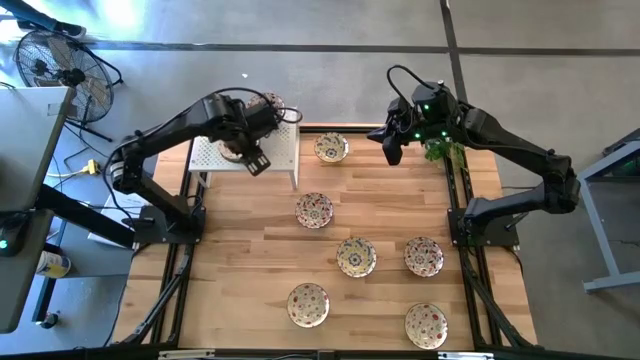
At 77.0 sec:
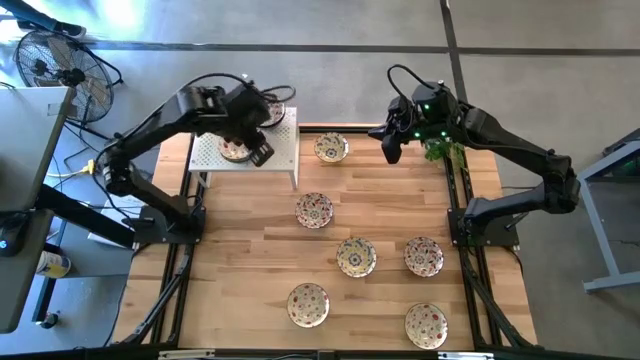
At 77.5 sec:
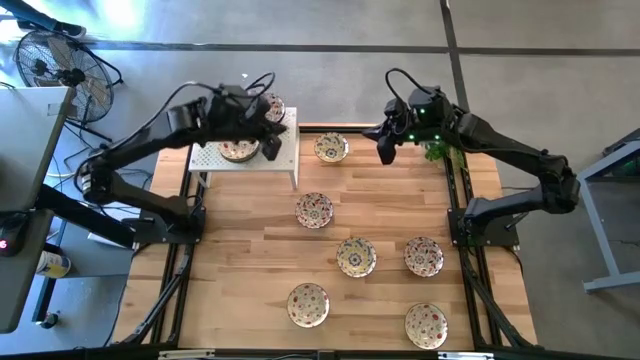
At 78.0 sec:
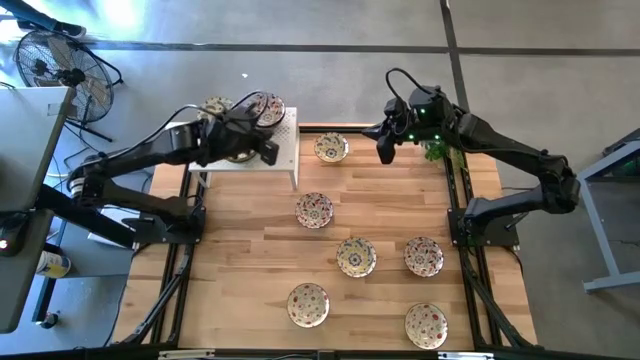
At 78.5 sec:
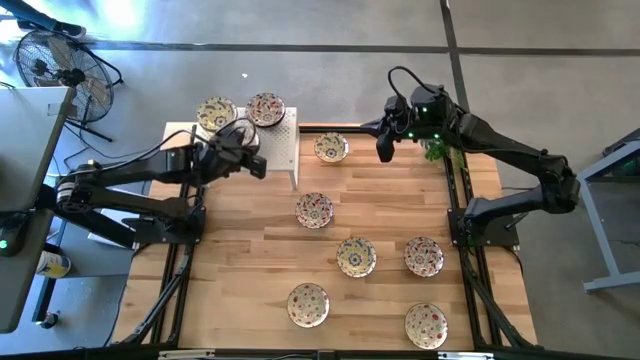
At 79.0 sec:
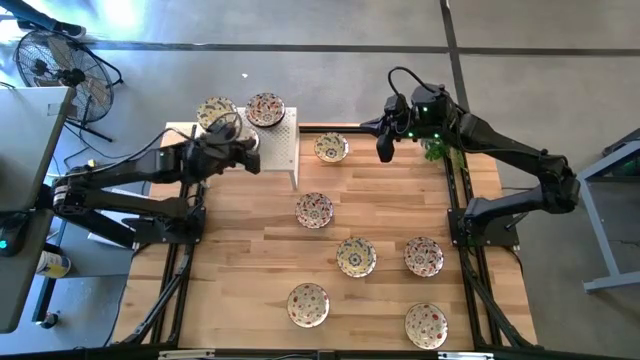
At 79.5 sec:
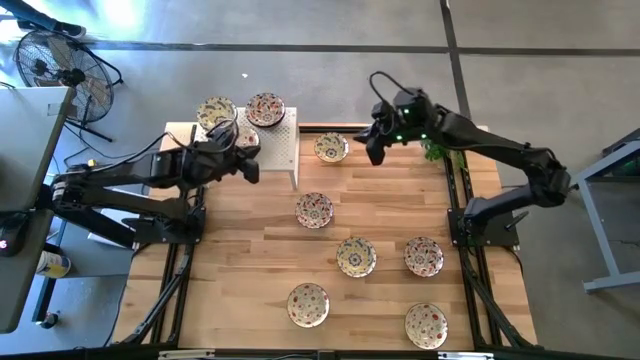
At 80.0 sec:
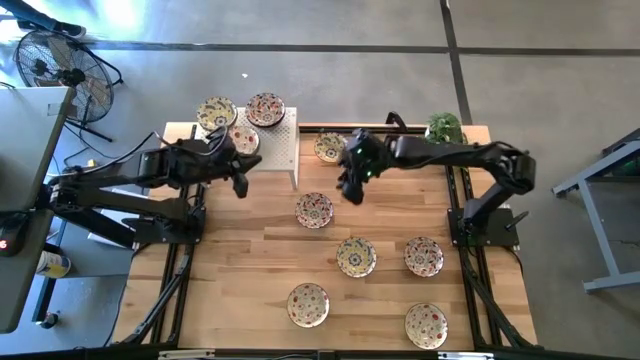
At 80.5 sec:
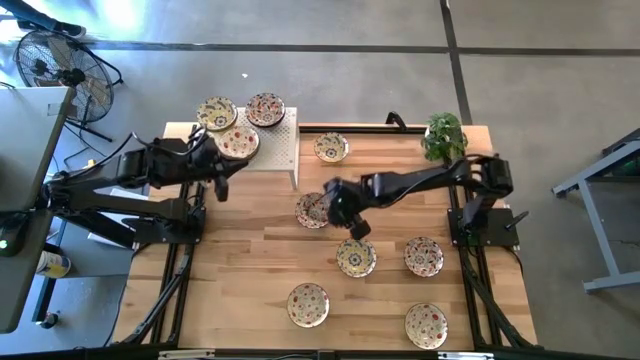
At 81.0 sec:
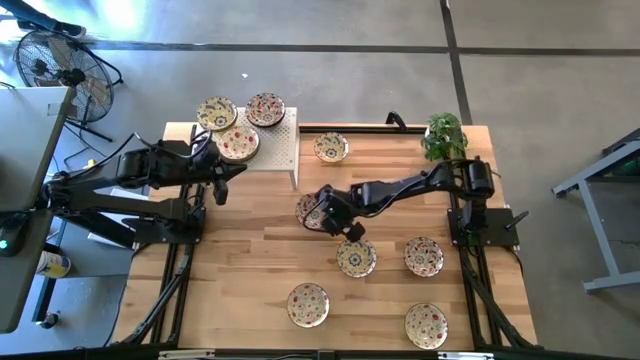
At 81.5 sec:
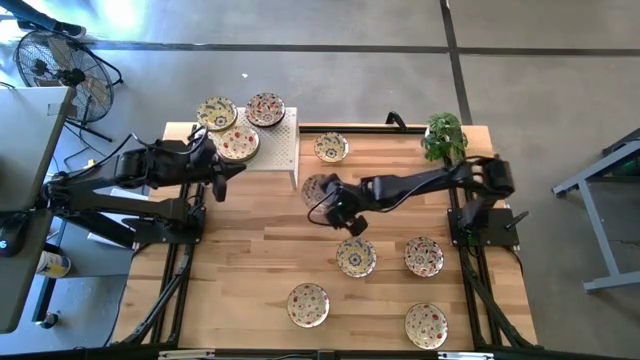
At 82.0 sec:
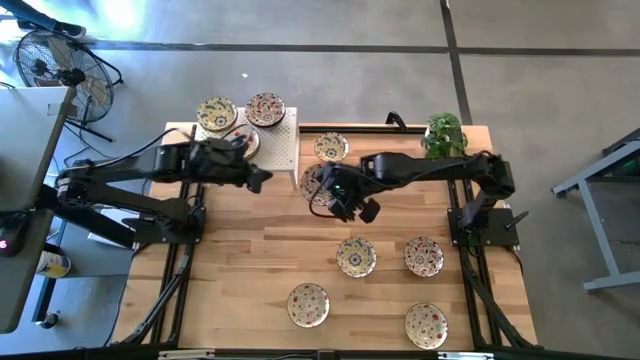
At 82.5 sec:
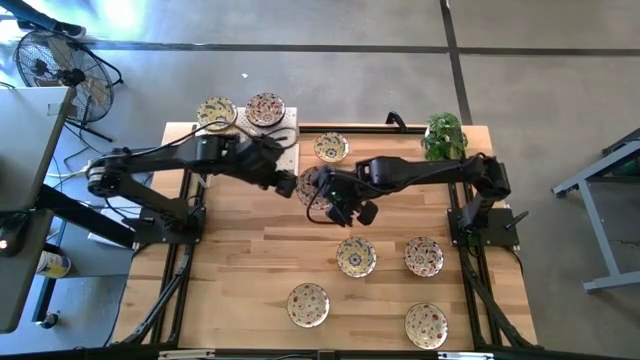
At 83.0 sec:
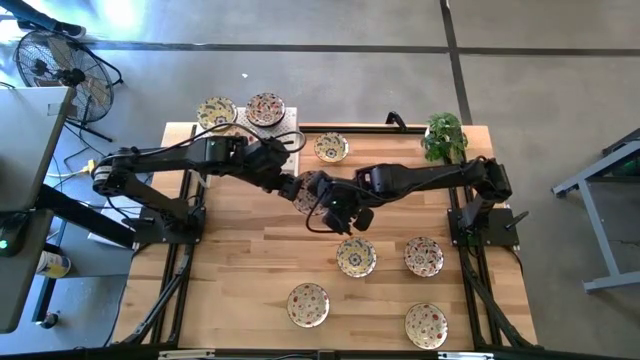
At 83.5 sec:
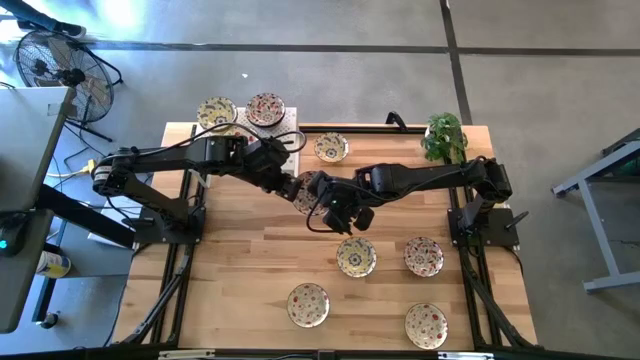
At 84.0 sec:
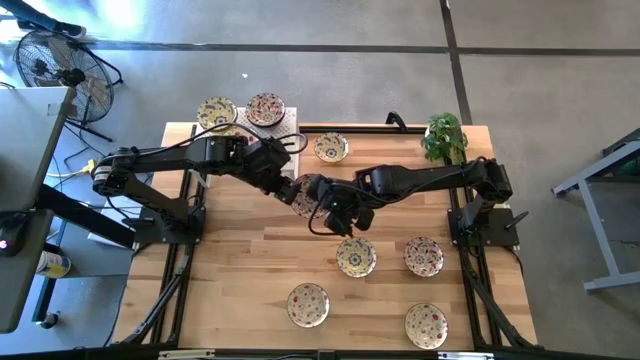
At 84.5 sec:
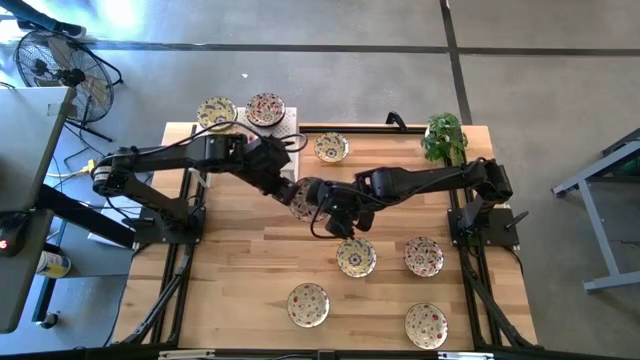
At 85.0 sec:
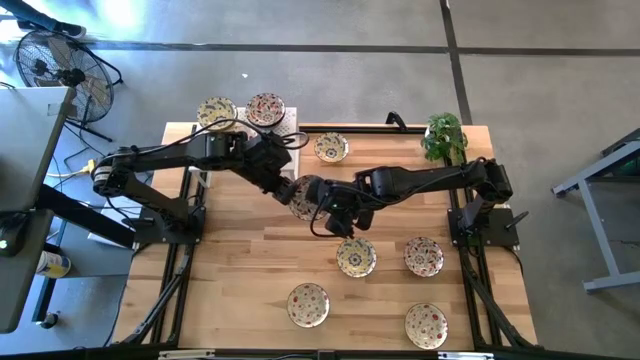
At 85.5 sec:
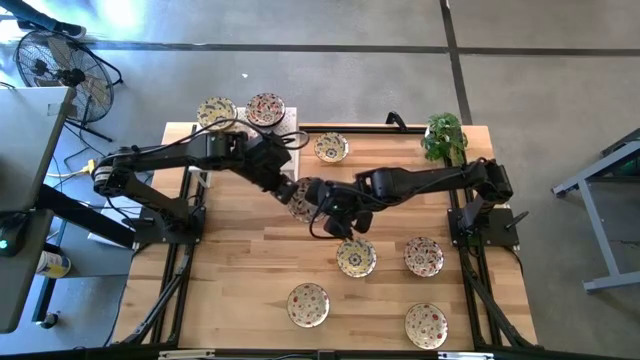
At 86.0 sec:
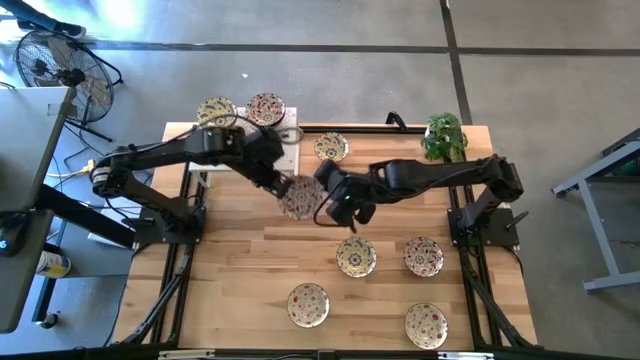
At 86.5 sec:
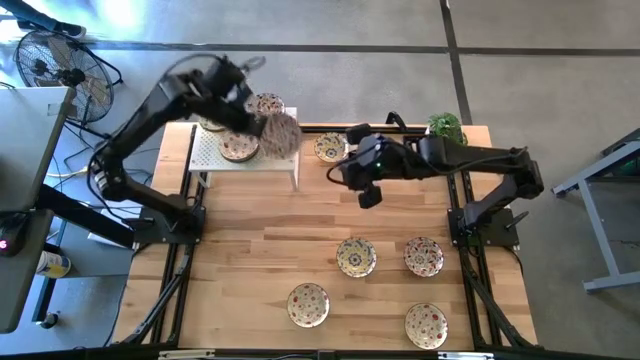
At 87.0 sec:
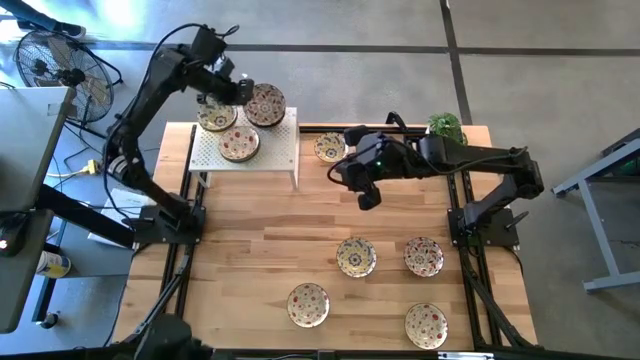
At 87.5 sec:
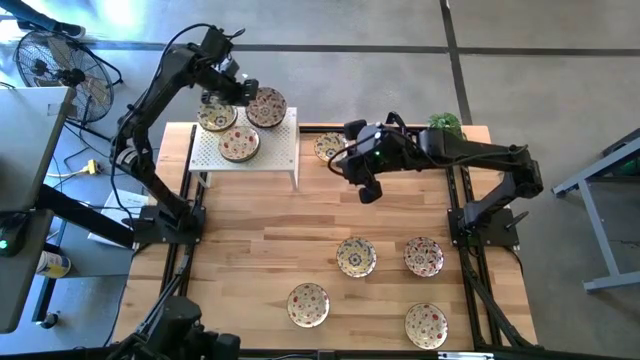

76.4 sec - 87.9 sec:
Task: Pick & Place Mini bowls
Stack the green patterned bowl on top of the green patterned bowl on the shelf

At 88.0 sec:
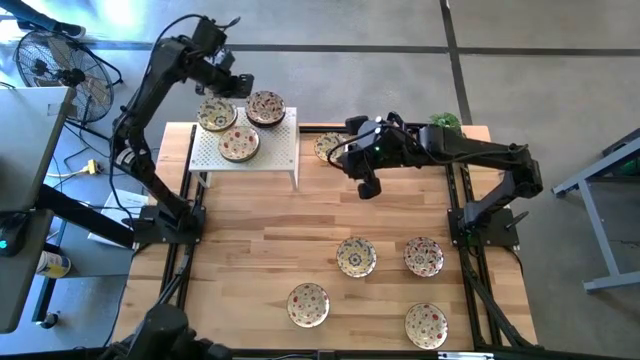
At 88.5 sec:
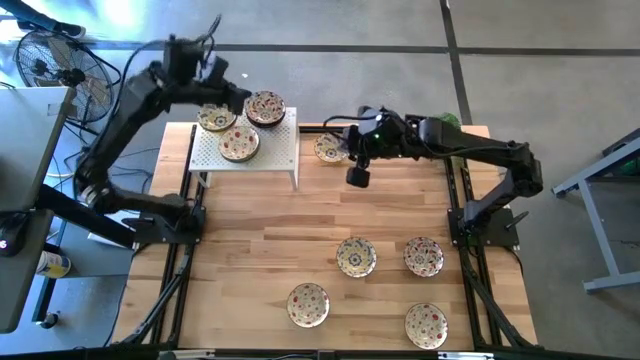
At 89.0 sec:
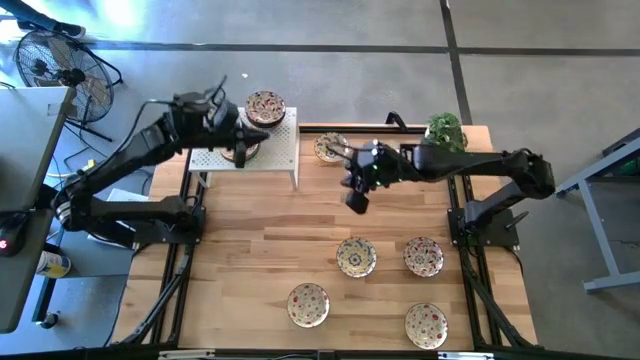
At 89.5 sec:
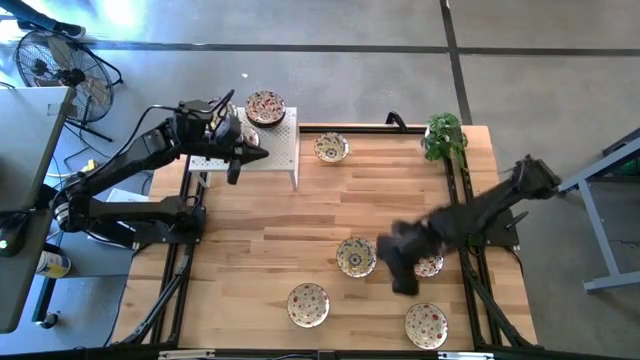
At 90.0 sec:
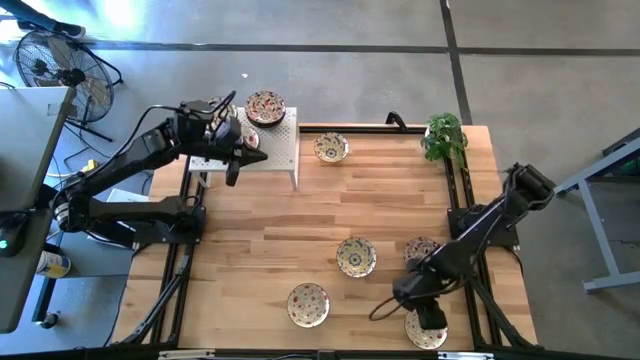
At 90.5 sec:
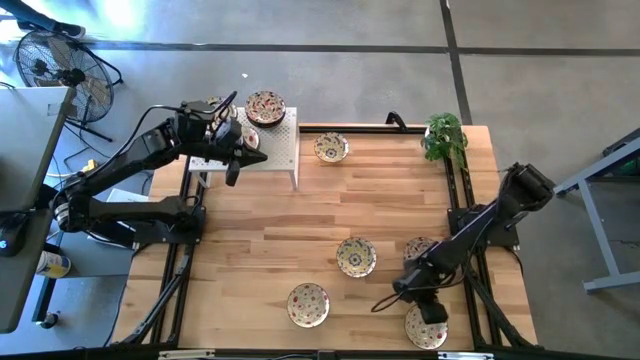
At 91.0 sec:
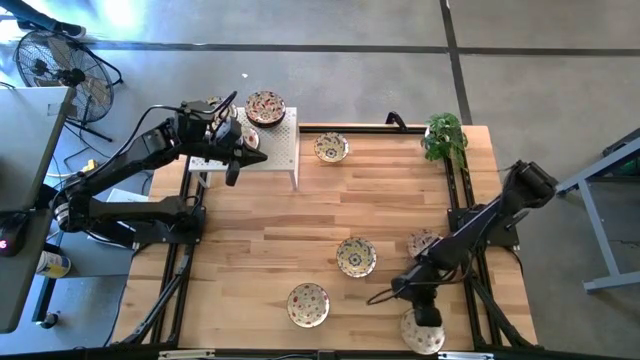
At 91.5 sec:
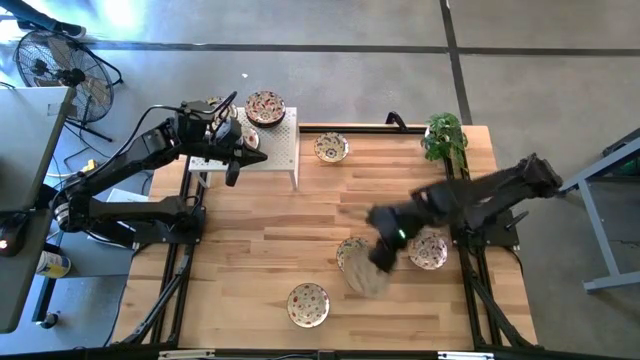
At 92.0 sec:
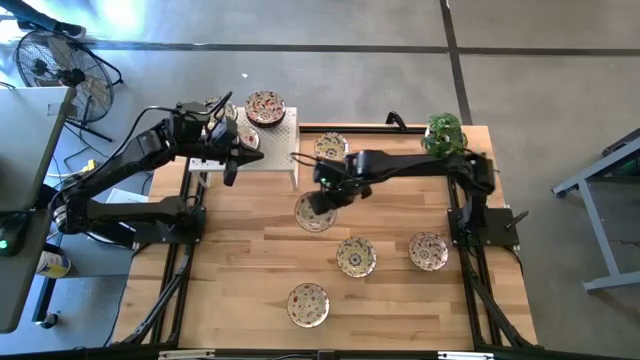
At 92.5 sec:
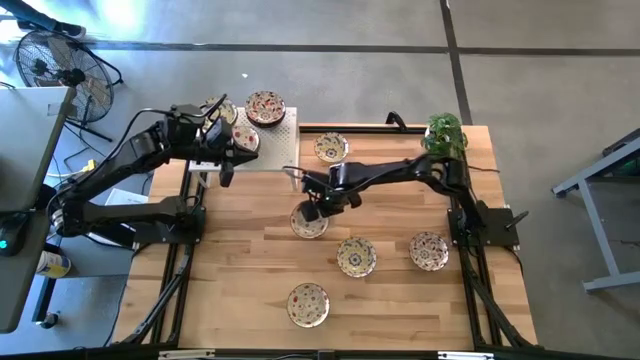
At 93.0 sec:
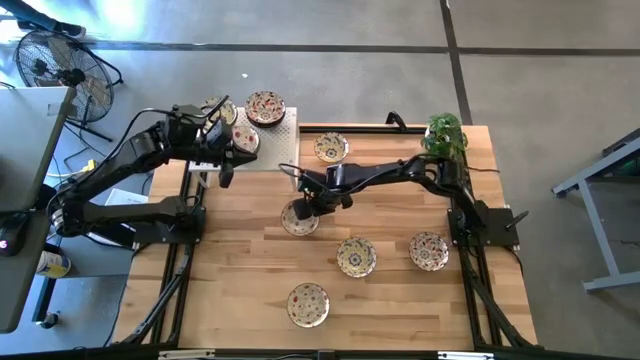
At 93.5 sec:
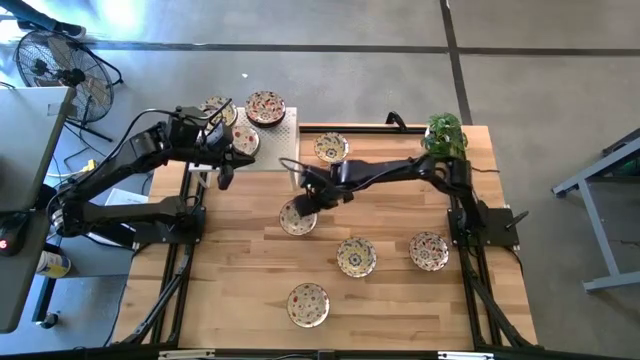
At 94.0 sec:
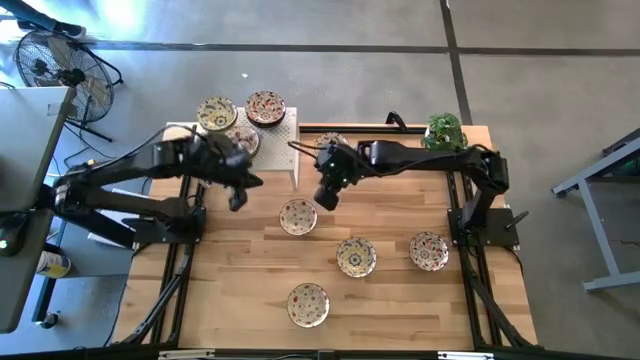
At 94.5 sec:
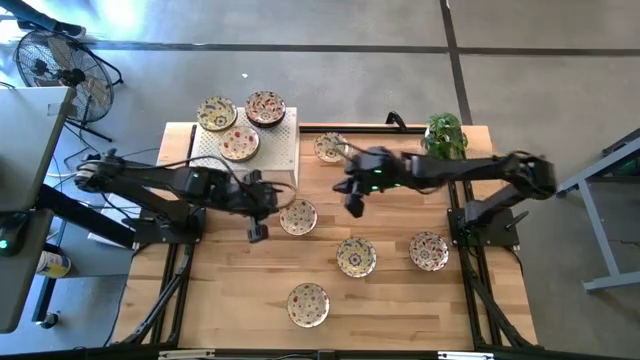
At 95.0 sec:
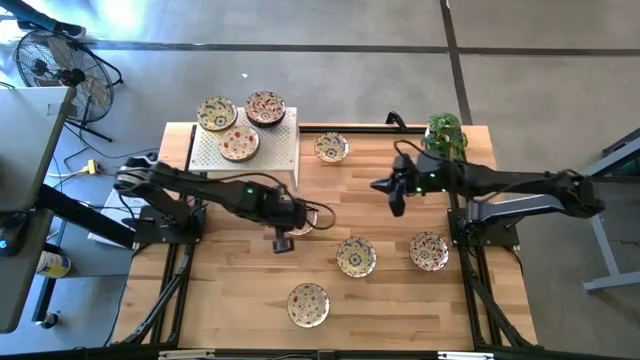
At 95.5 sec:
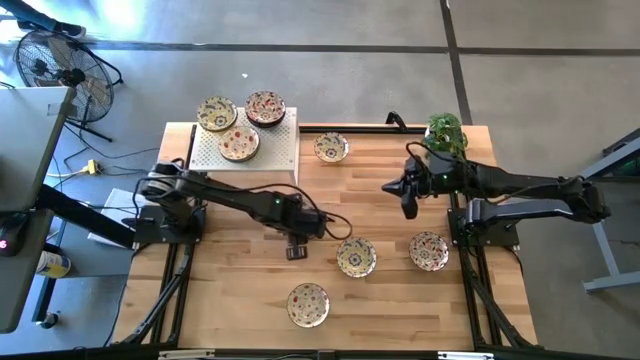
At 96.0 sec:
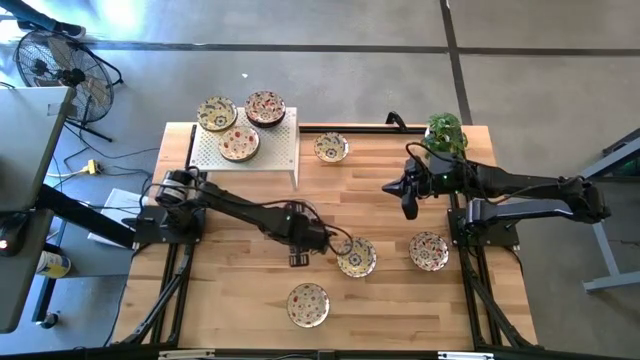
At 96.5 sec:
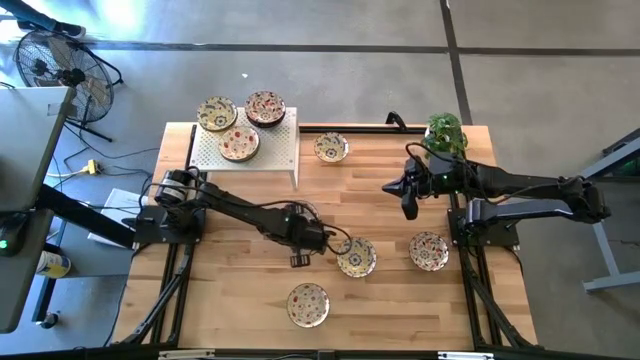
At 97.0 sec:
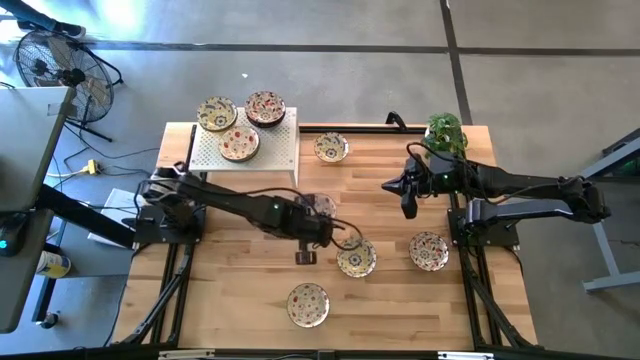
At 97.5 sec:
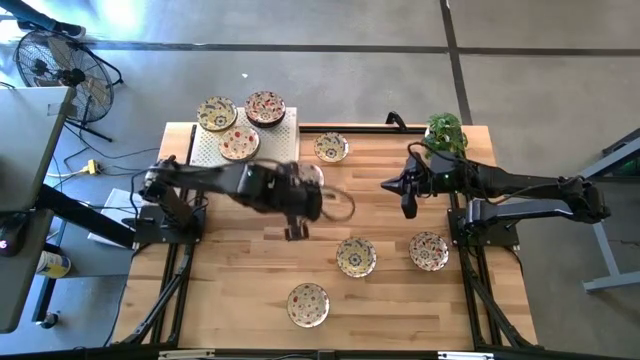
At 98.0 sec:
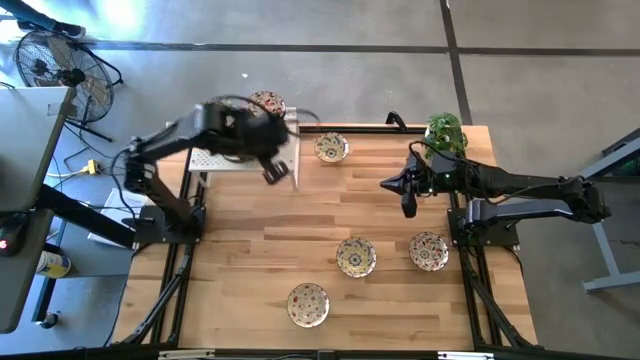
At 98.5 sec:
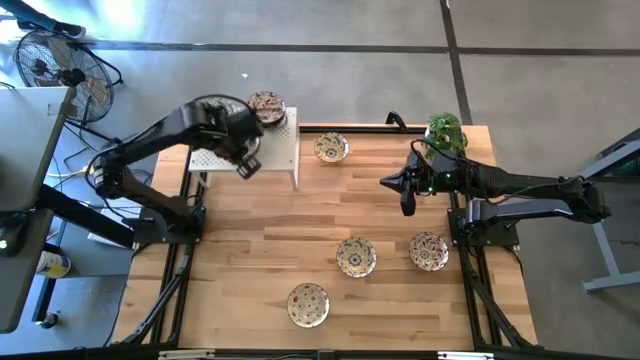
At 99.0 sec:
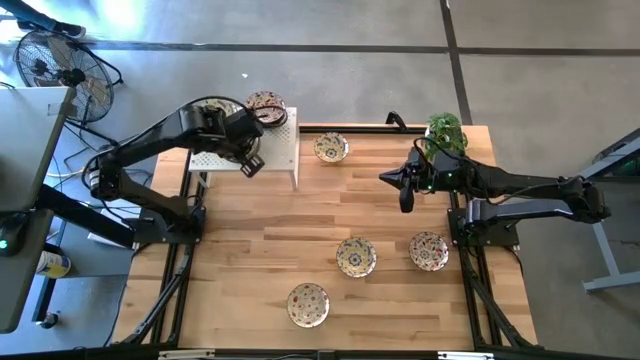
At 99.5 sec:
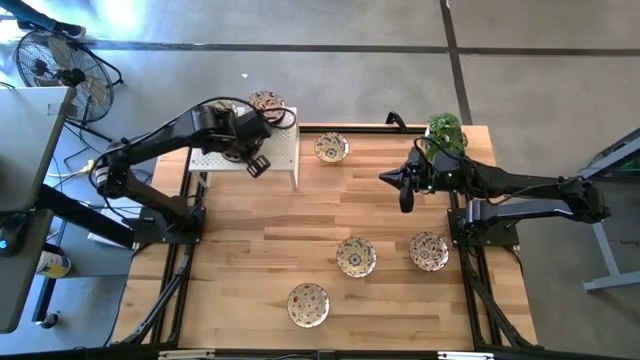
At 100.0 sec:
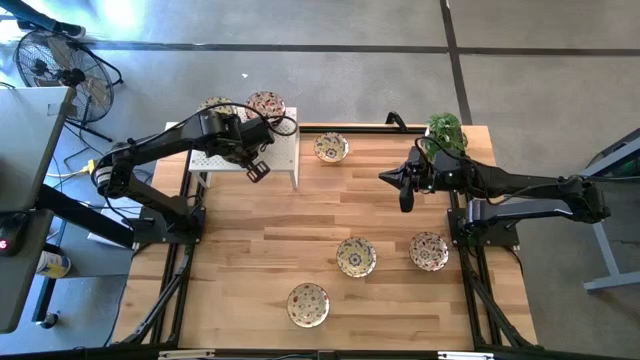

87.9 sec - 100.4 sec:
Stack the green patterned bowl on the stacked green patterned bowls on the shelf
